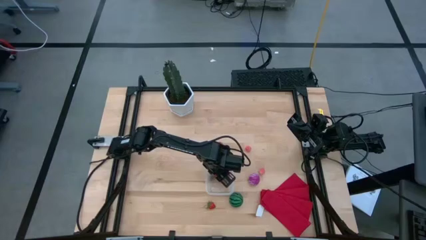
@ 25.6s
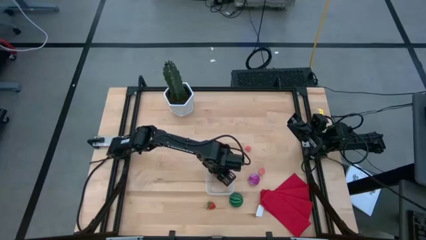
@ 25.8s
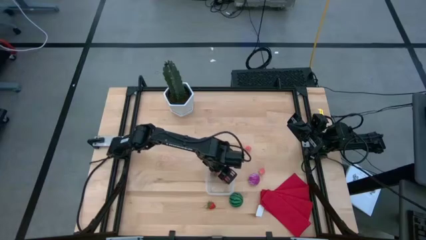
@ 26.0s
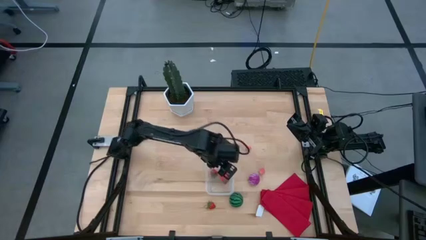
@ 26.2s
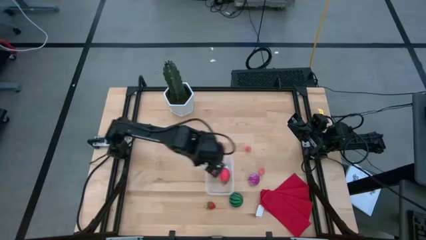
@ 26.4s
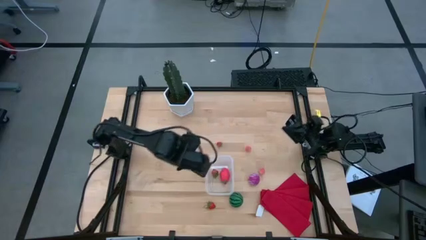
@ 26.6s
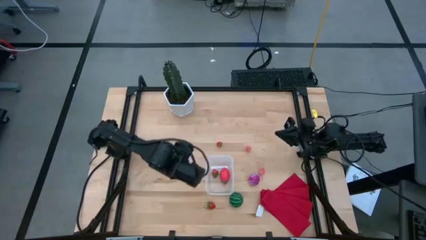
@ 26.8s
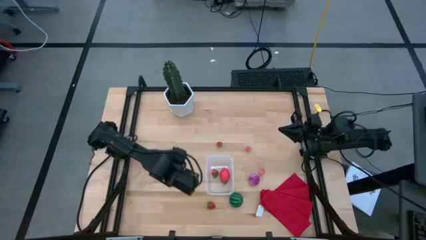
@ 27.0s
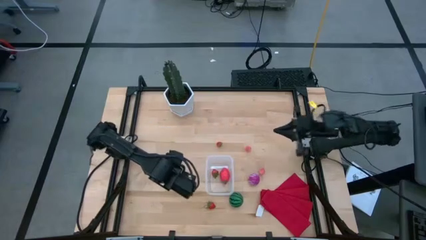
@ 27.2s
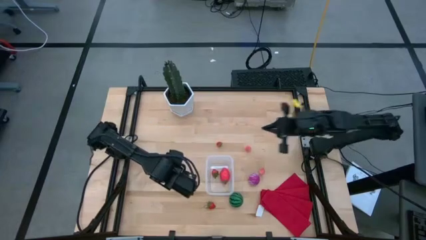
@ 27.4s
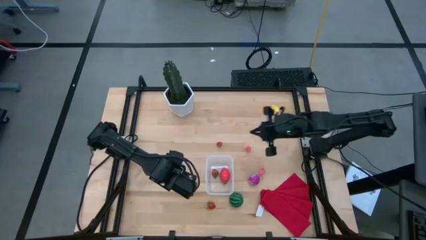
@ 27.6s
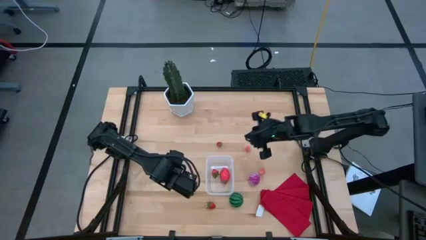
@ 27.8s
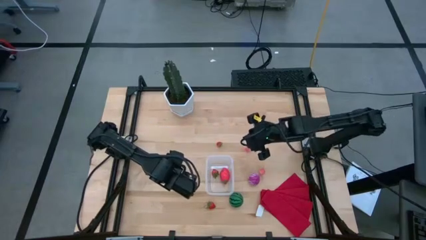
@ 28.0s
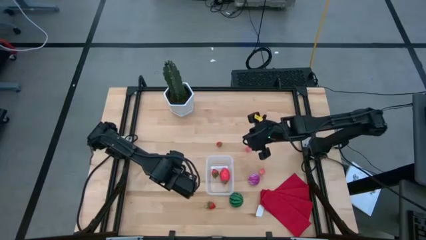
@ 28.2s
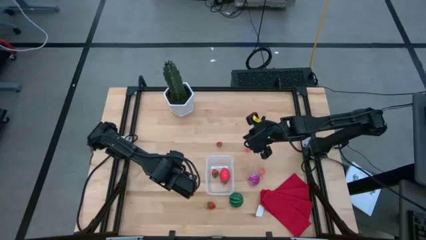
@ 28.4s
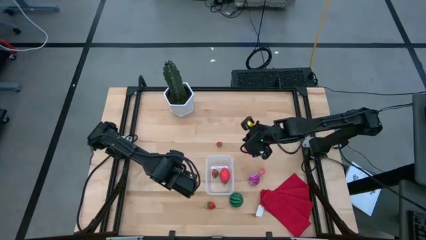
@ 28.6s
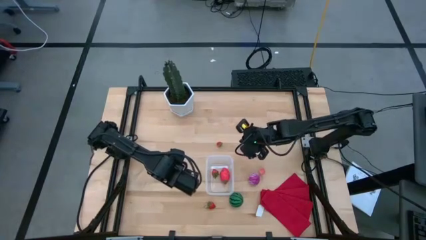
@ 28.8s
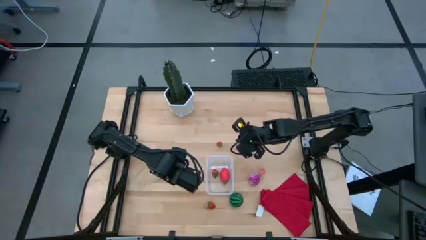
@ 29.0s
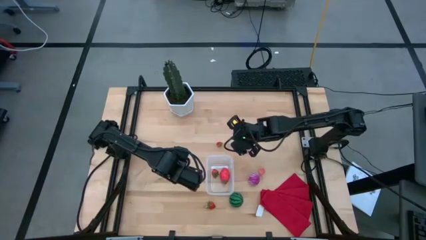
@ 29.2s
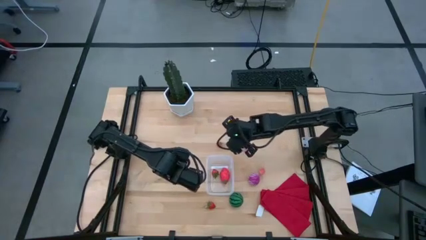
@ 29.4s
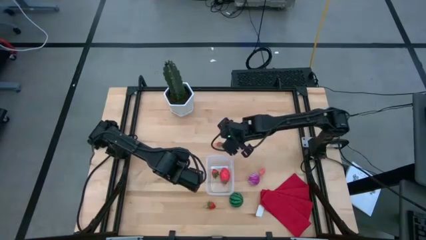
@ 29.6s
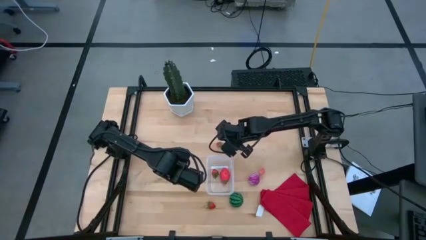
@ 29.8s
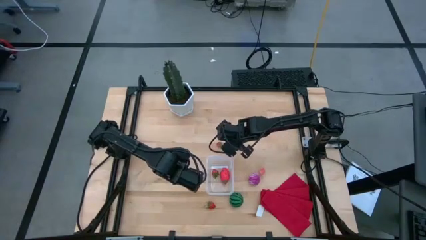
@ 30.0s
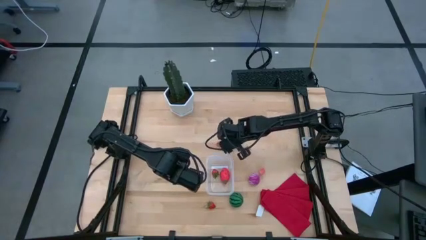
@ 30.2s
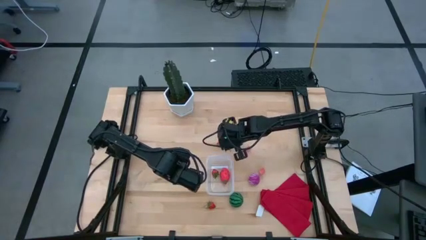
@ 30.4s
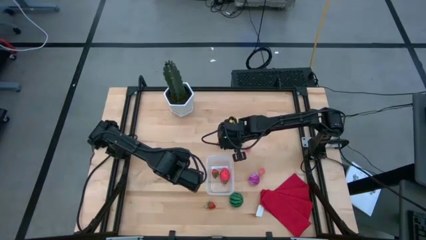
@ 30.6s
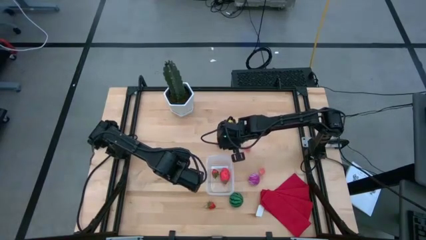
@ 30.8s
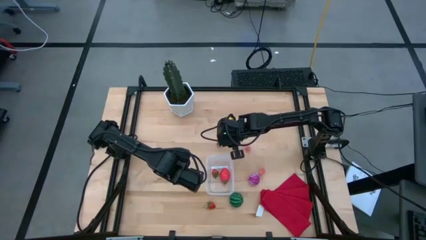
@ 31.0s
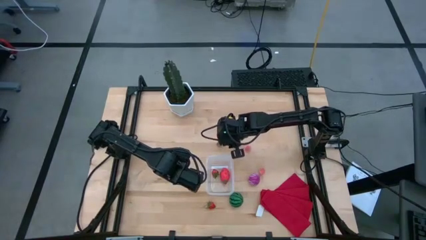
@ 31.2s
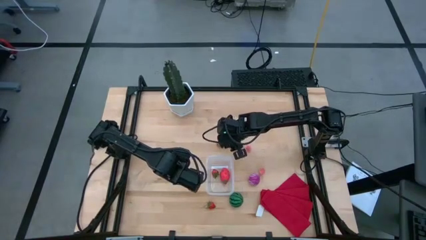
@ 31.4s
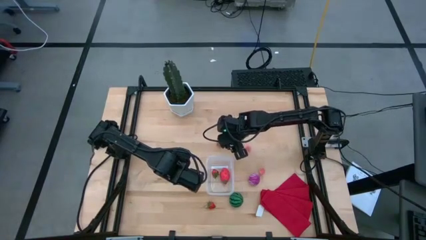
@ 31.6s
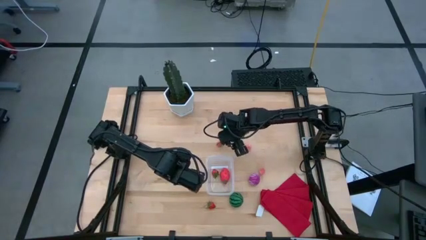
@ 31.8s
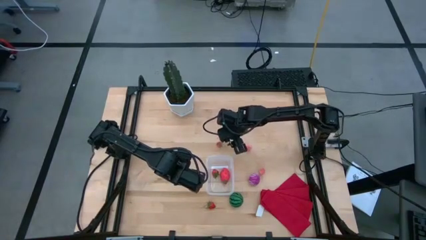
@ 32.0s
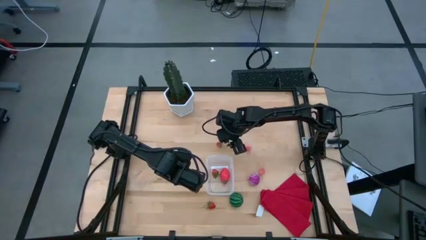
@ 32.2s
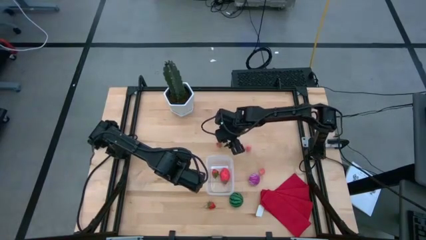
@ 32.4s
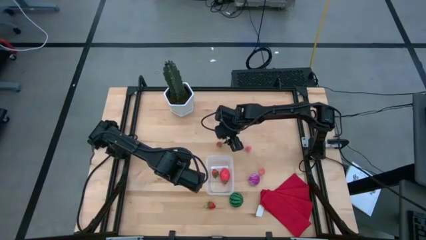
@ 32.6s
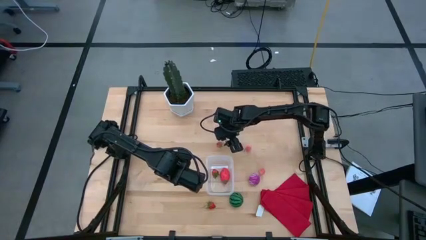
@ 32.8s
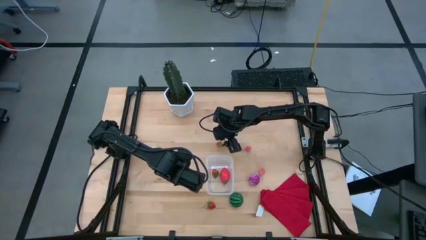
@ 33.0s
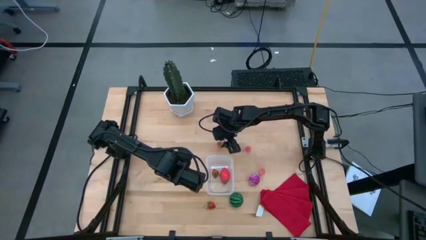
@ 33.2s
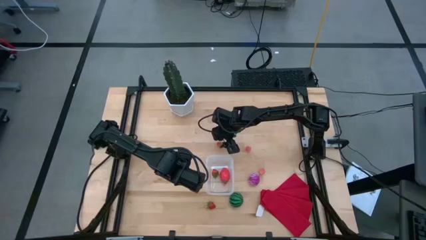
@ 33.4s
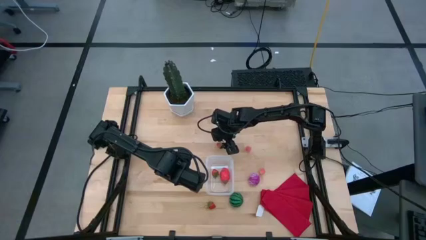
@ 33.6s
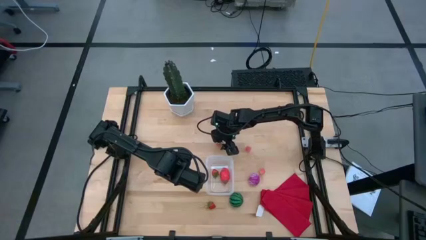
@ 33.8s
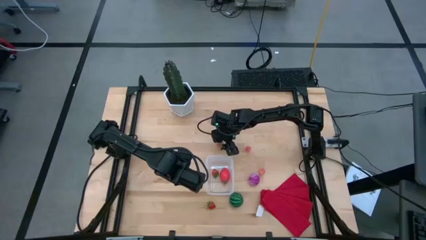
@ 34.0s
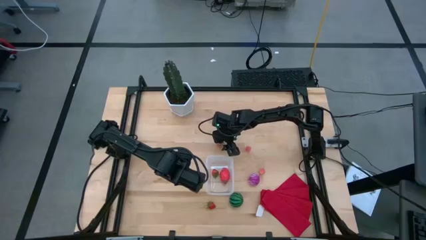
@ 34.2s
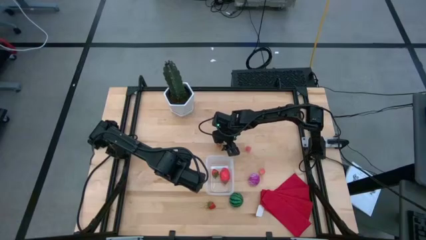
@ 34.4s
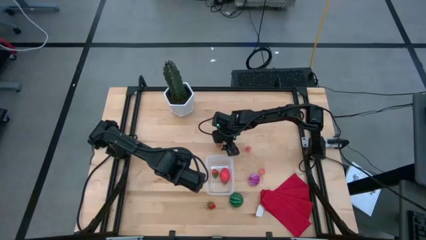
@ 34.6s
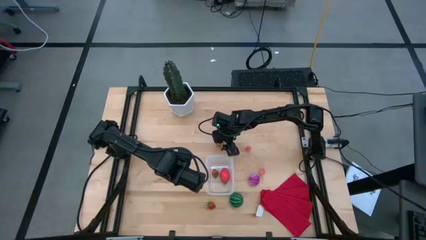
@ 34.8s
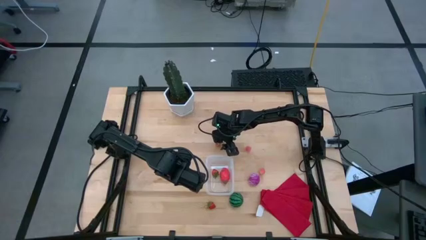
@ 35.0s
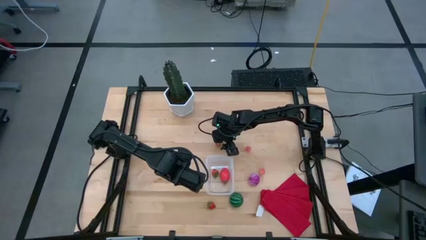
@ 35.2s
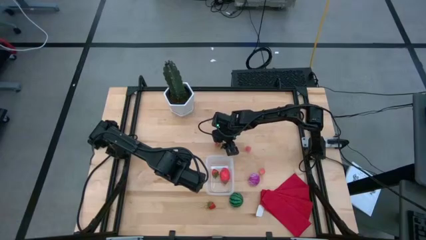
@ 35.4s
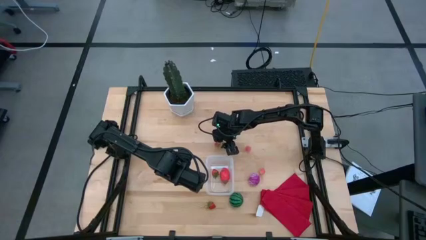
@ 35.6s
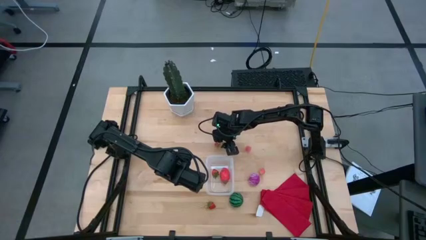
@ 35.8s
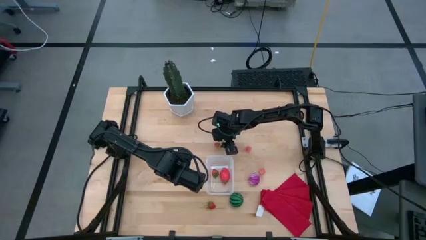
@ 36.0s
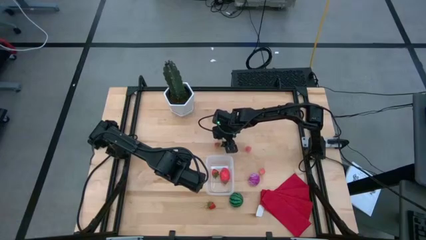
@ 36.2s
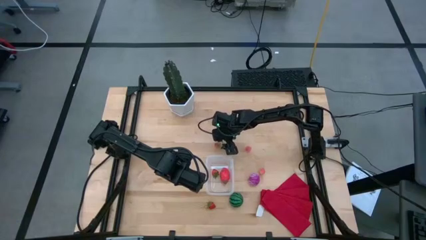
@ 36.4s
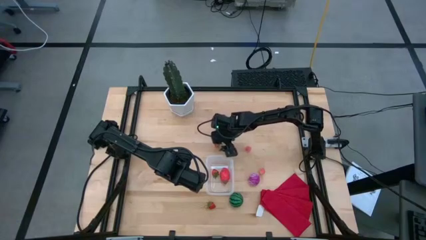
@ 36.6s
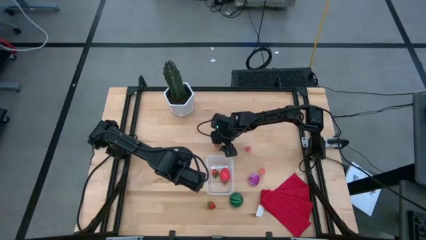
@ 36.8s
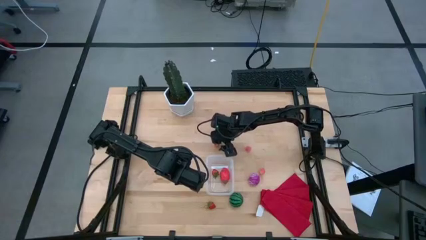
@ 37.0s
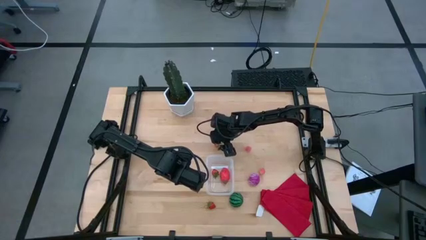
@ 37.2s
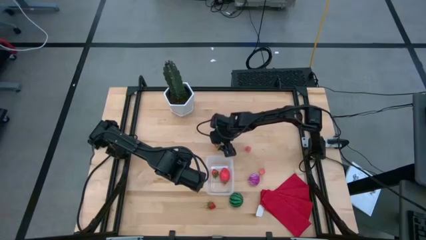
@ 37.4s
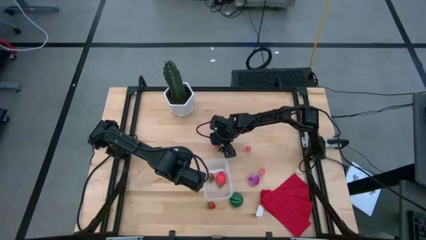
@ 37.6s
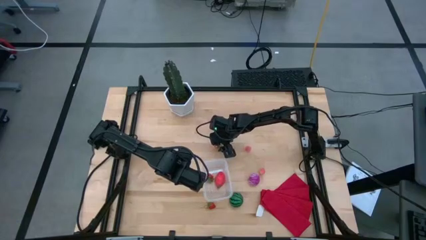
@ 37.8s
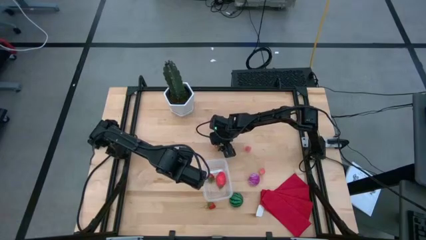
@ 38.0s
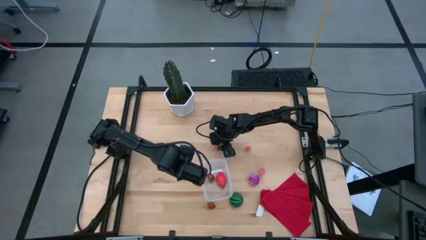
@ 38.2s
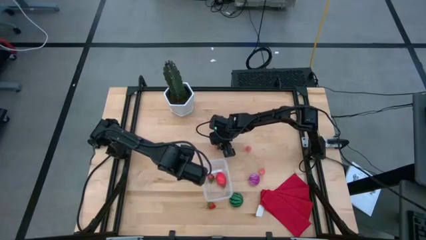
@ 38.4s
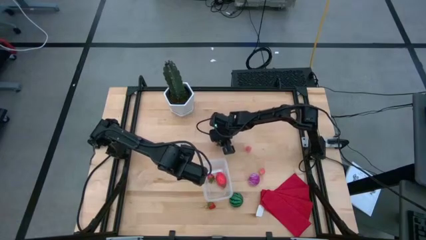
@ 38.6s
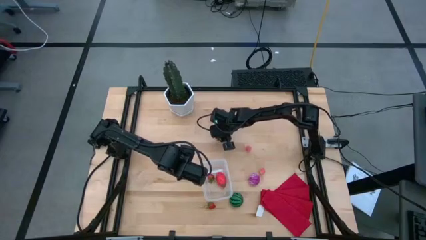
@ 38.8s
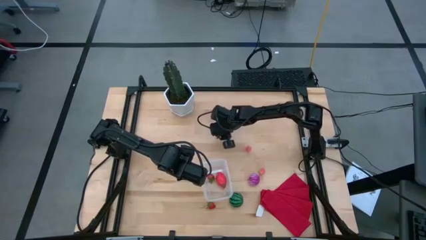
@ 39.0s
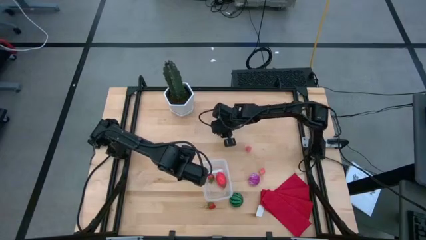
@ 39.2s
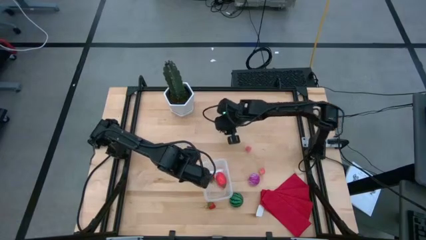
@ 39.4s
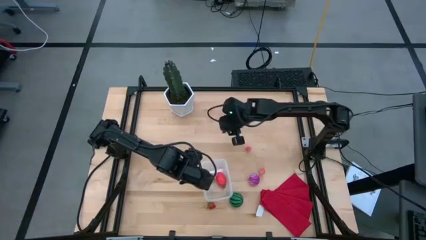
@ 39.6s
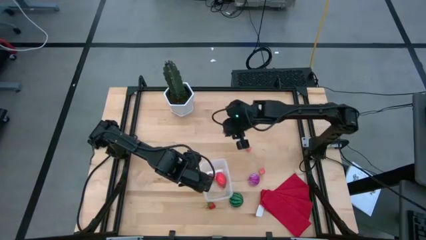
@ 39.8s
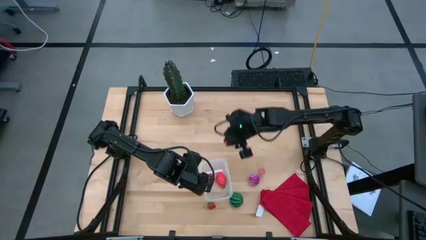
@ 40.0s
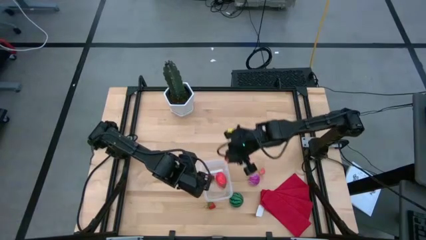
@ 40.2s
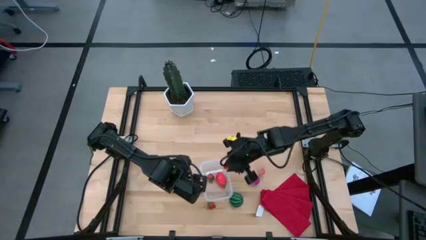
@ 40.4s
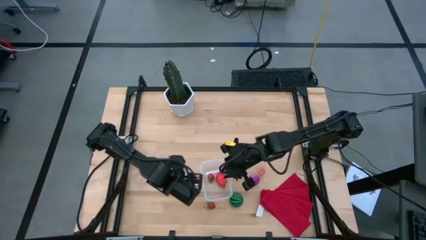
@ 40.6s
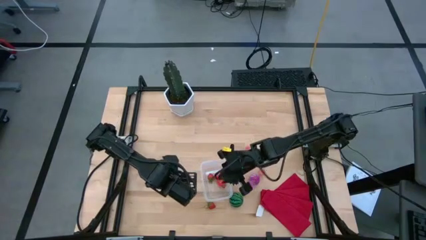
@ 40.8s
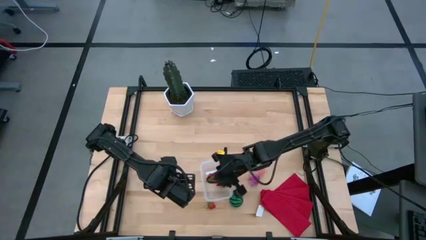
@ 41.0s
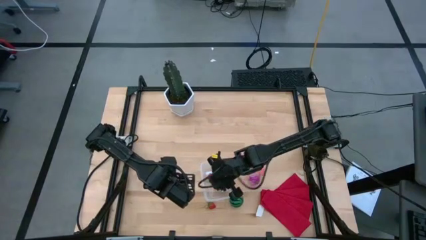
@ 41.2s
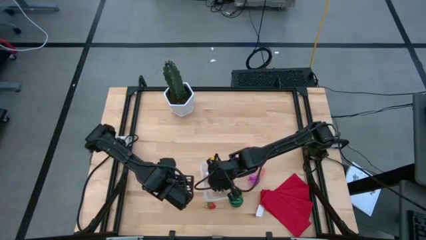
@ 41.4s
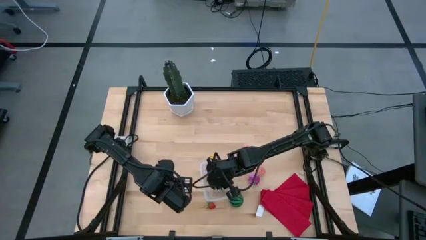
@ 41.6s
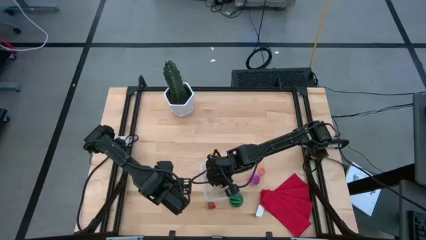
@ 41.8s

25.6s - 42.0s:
Task: Pick and placing Produce into tupperware
Put the top strawberry into the transparent bin
